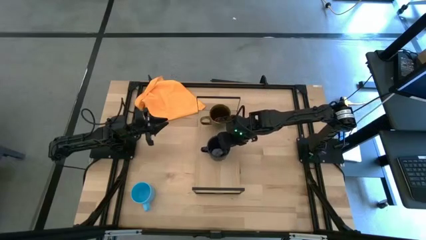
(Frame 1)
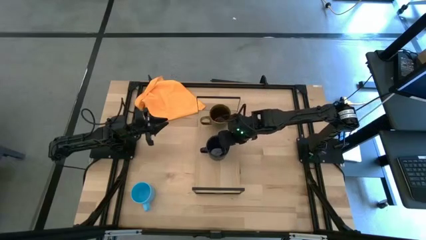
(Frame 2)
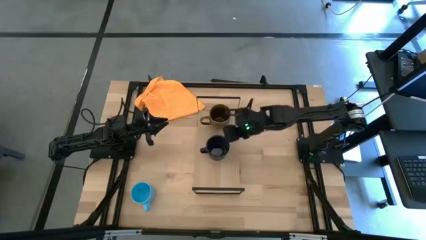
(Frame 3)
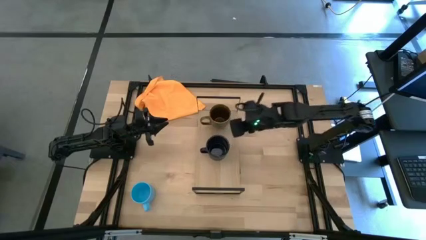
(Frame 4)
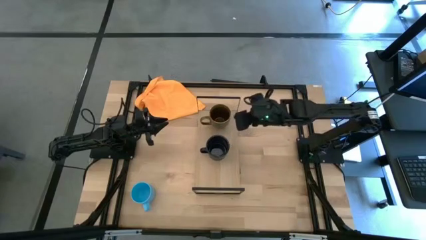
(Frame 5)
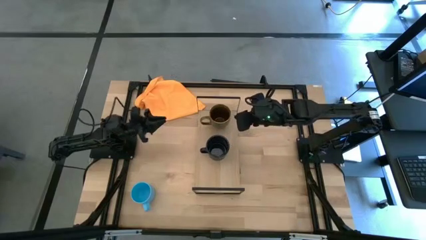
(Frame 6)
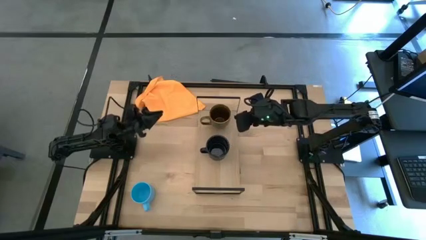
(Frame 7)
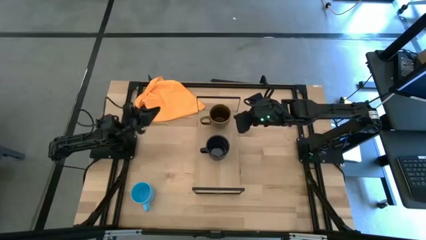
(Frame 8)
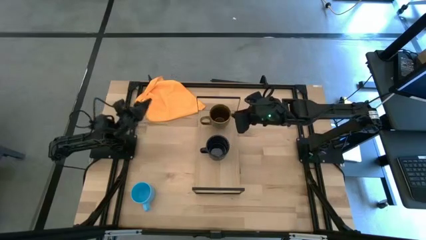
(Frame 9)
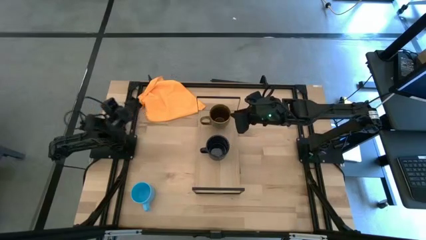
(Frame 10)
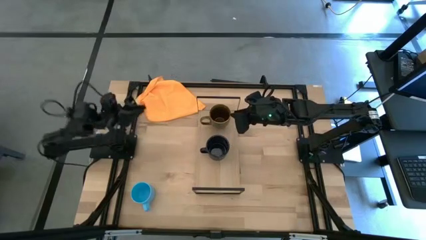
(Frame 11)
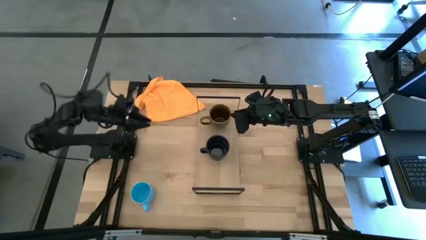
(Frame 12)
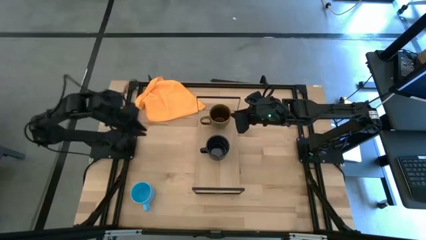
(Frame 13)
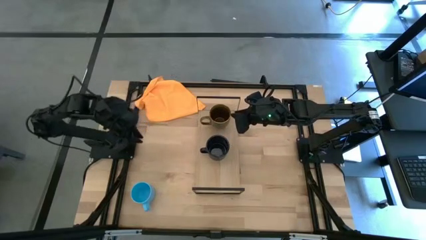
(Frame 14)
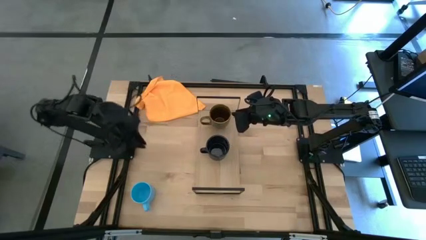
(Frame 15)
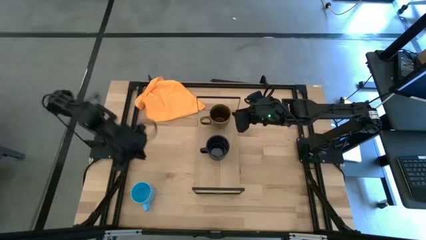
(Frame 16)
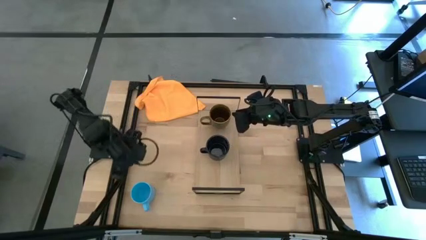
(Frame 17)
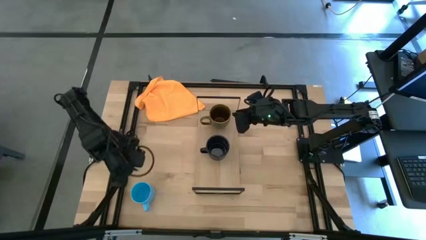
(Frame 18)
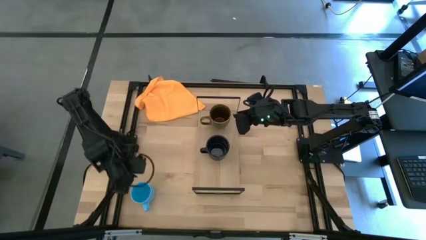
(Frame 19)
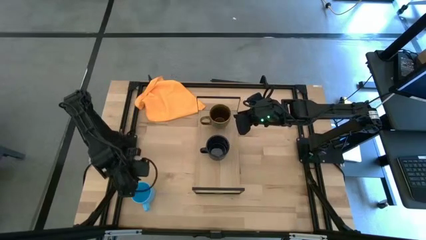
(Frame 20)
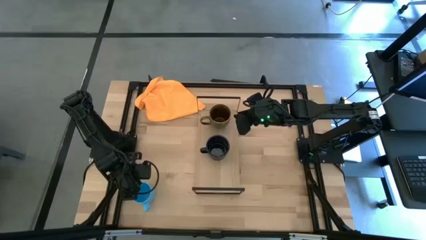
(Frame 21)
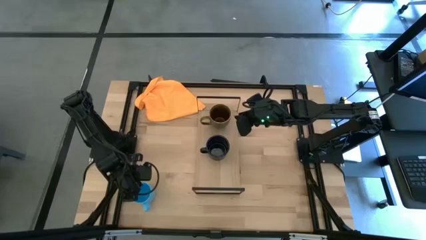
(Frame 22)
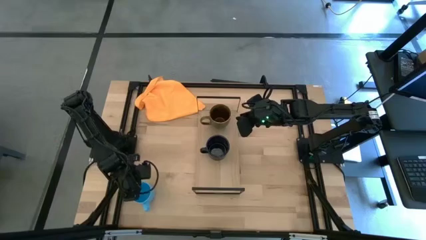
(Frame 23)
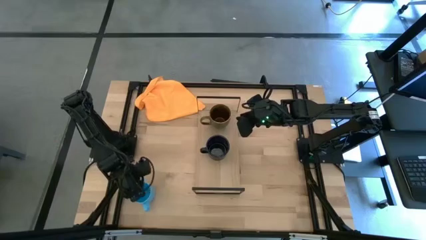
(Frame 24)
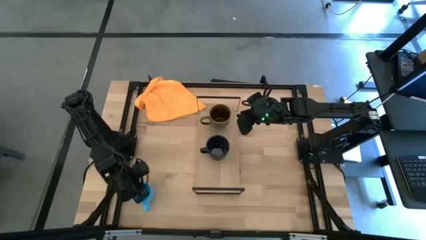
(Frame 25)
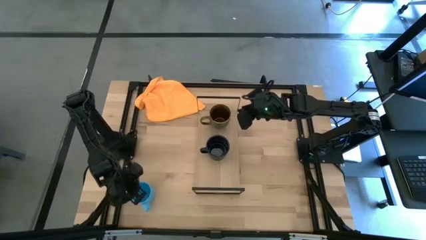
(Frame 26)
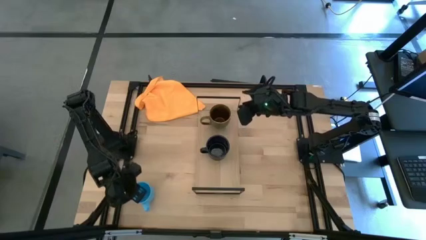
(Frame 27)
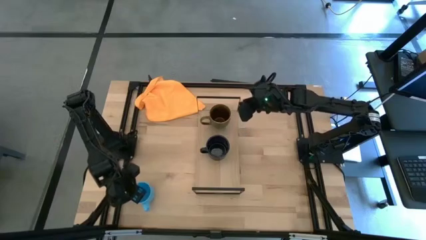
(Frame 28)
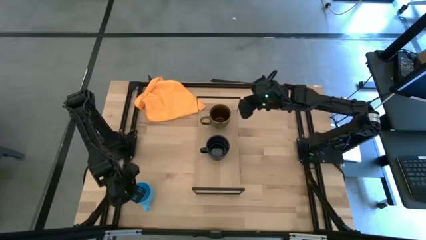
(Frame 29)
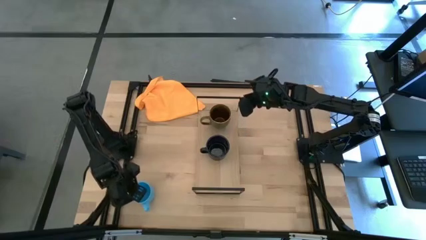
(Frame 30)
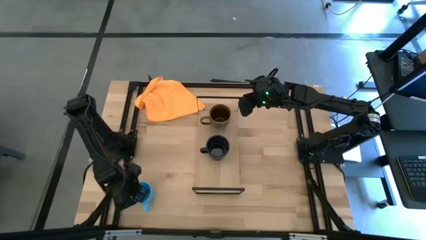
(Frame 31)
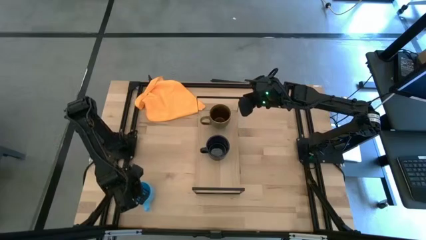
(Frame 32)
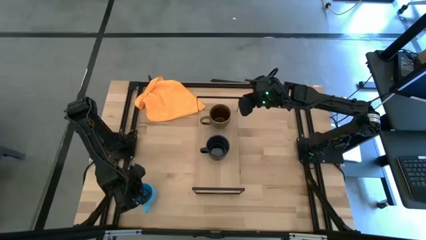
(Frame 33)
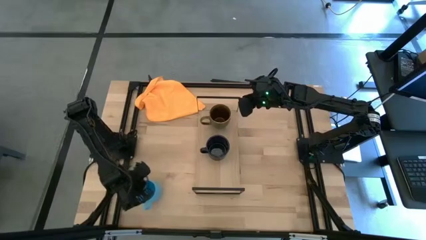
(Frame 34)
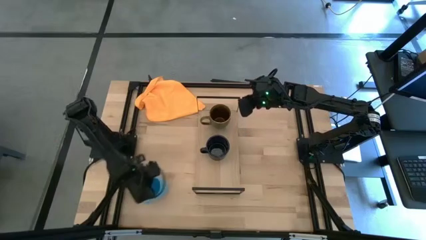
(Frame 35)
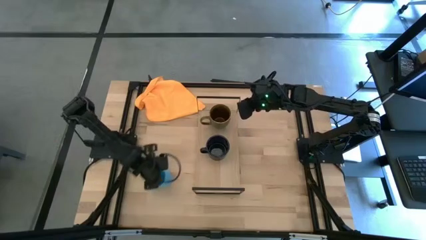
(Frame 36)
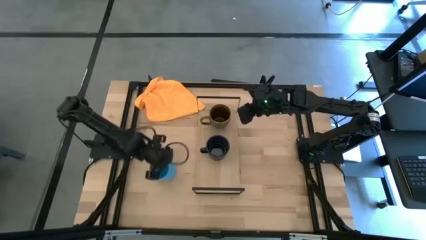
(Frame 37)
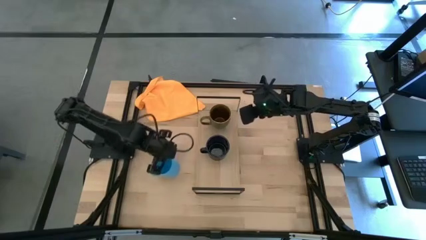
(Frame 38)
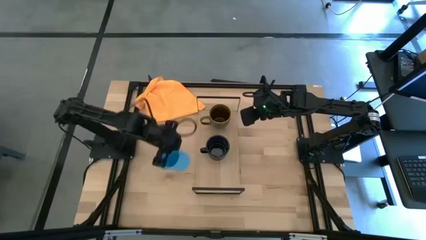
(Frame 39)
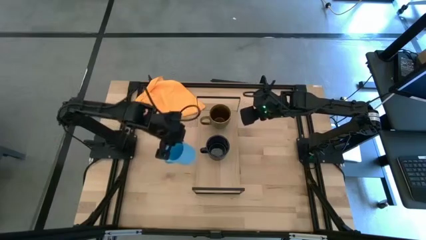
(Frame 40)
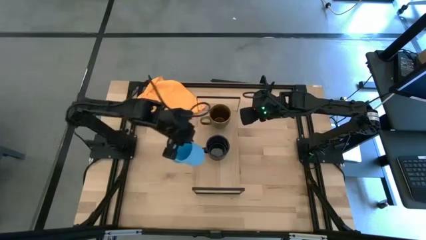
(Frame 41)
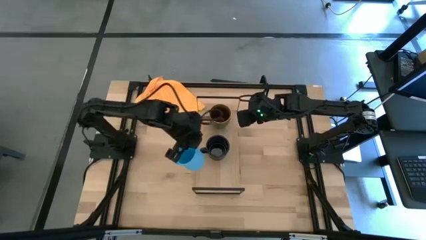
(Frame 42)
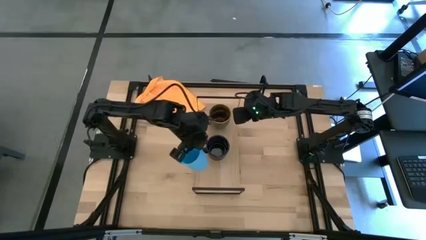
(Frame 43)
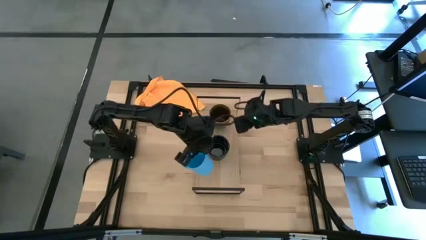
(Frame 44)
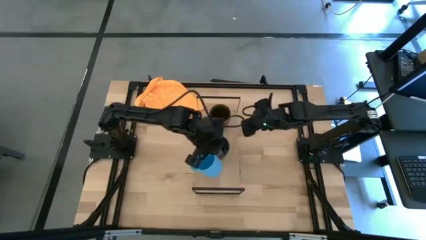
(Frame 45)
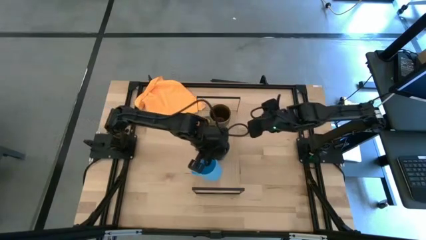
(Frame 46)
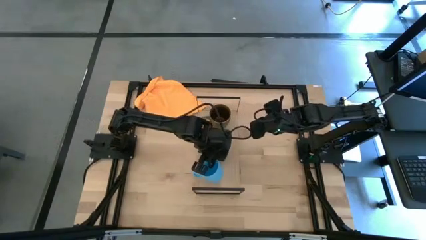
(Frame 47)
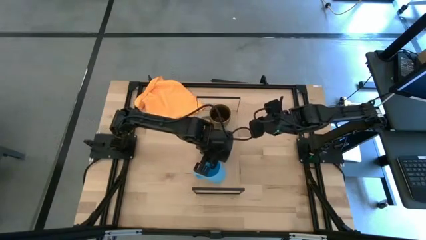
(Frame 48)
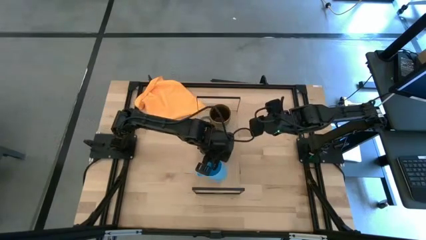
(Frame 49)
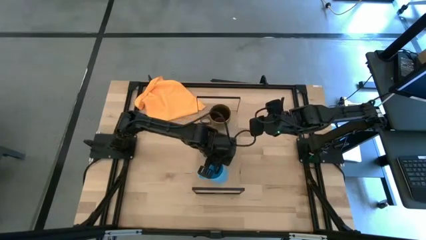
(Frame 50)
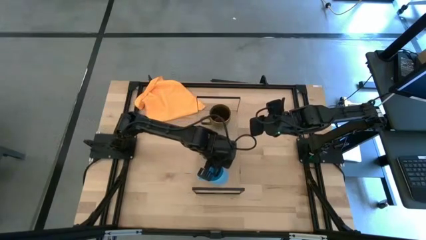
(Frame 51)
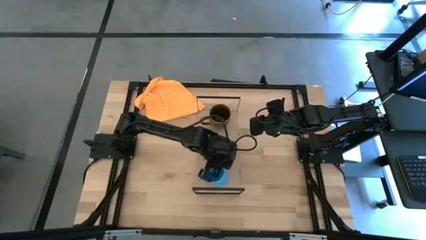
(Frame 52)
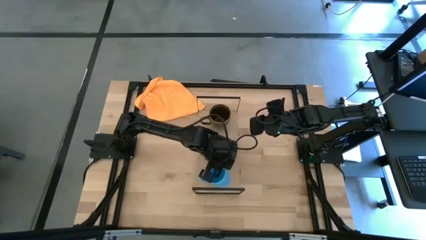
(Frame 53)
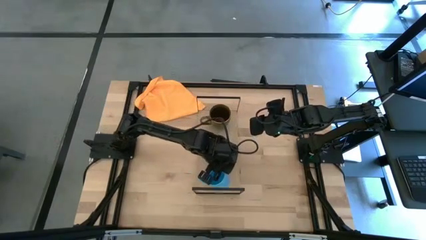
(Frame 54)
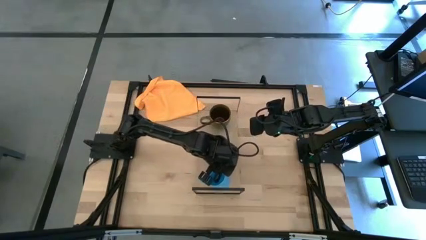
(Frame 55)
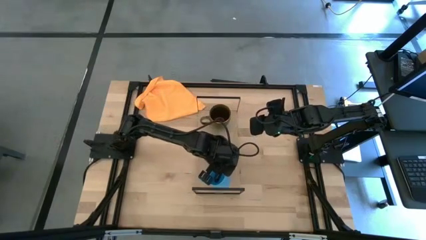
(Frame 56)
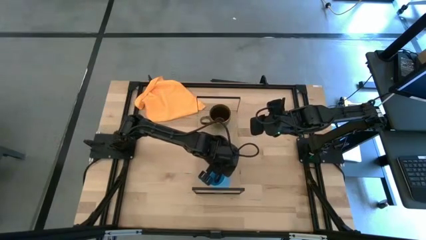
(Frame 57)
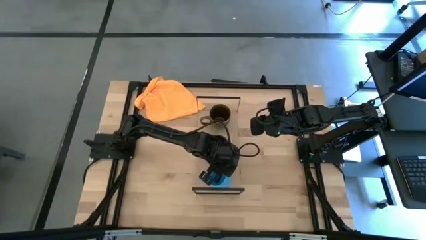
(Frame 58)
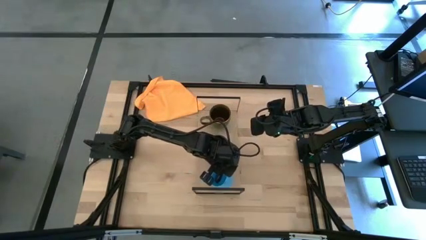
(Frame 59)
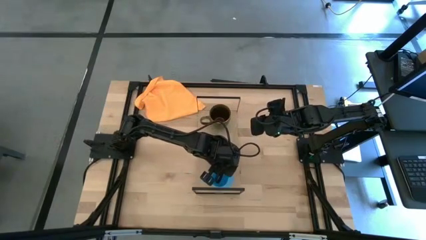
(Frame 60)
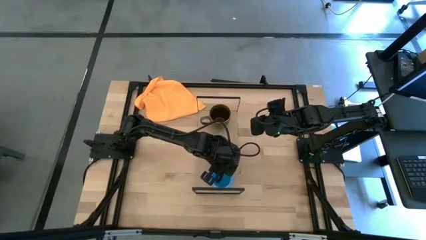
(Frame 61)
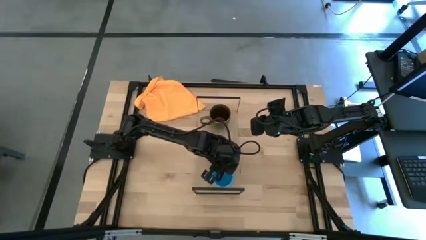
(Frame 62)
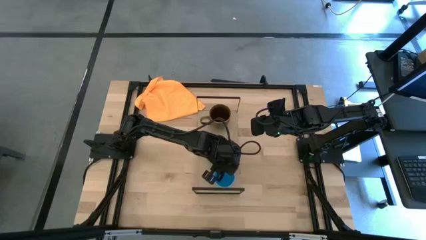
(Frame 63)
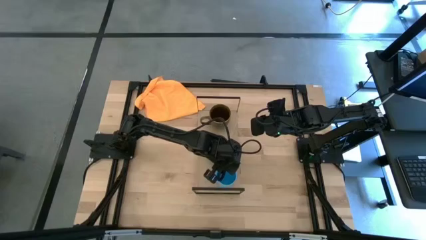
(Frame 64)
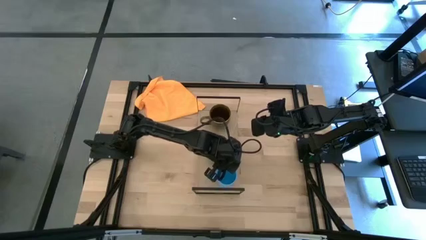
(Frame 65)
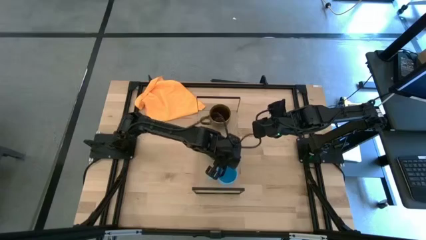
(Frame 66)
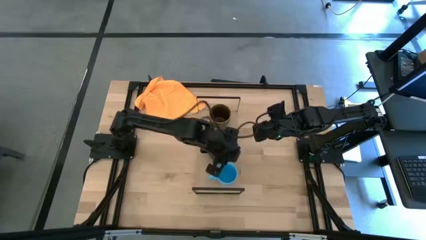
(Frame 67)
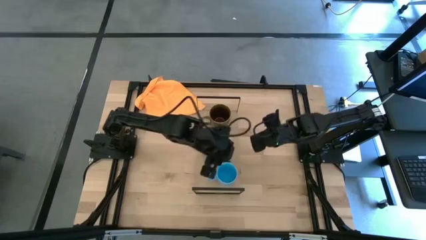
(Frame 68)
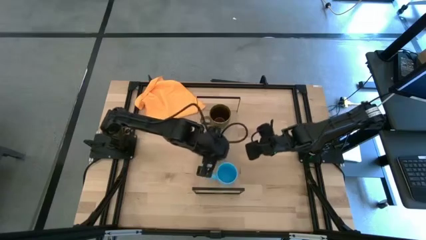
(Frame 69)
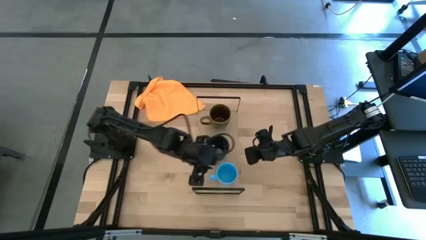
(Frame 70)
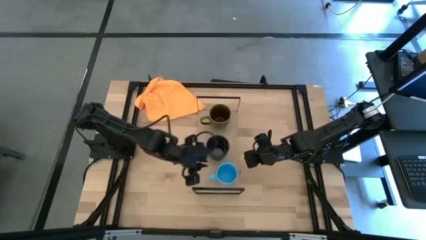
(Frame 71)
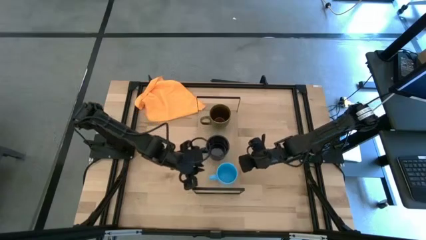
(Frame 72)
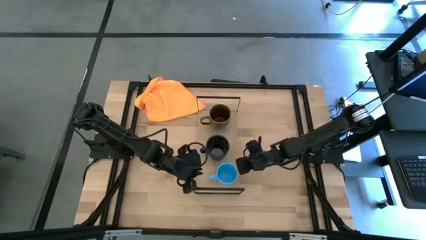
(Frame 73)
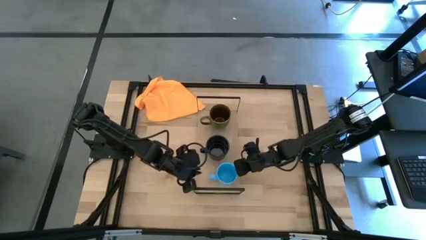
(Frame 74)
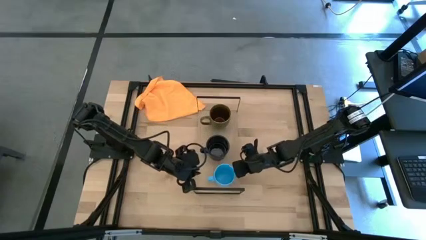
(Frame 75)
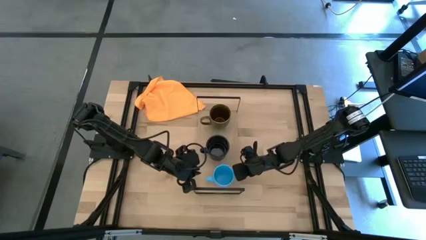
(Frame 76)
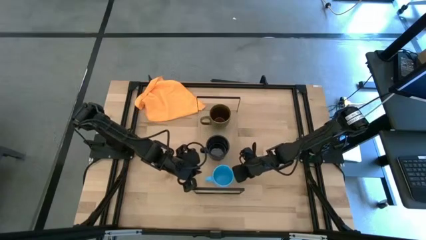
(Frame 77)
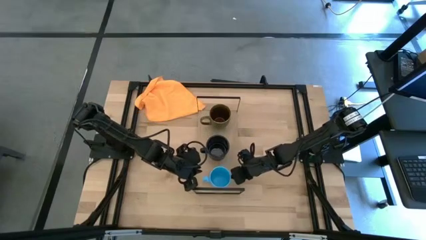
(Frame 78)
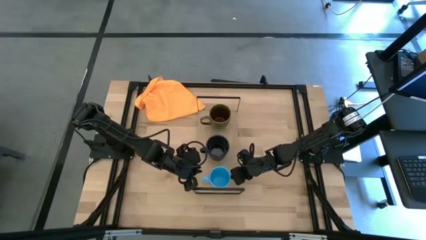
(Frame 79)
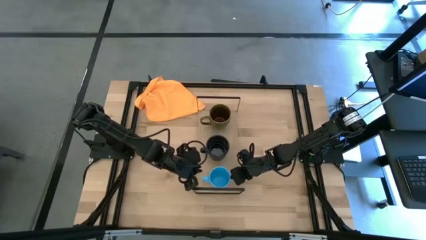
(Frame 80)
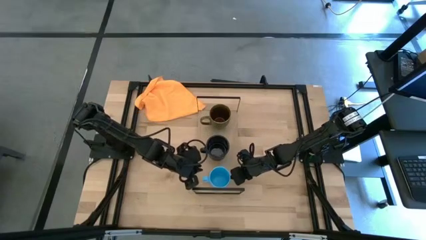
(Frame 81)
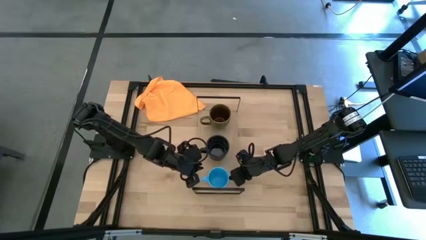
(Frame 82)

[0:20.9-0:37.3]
Task: Stack small to large cups/mugs on shelf
Put the light blue mug on the shelf

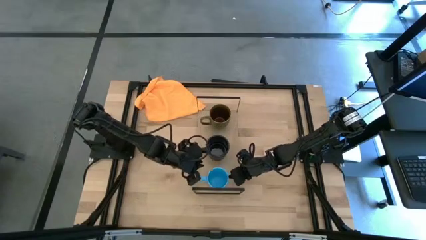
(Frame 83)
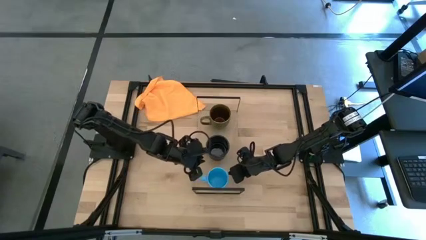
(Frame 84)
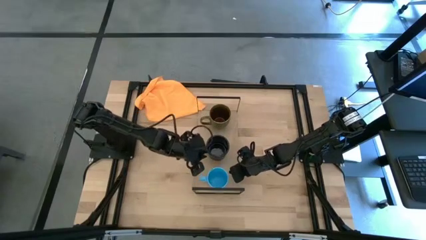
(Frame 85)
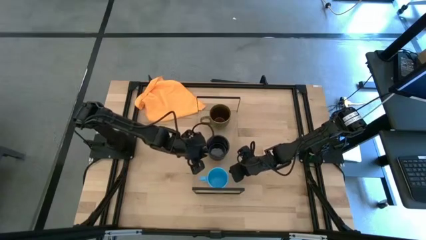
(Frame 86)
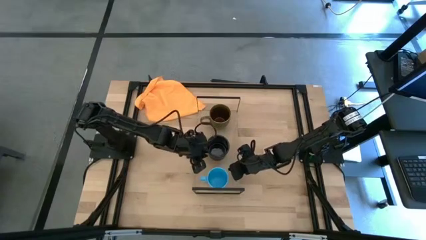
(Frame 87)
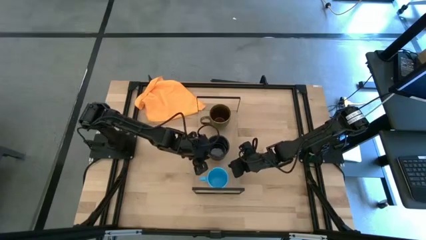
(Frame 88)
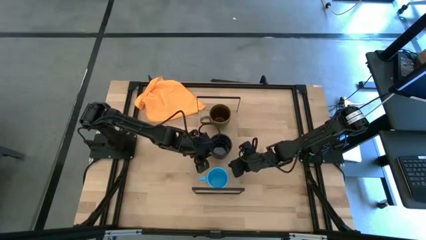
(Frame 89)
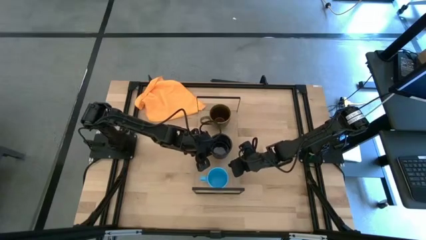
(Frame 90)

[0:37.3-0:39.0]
Adjust the blue mug on the shelf
